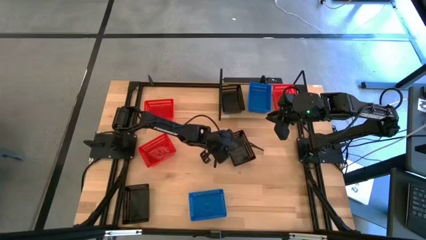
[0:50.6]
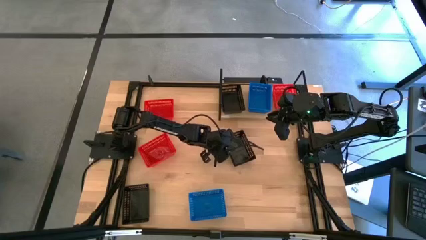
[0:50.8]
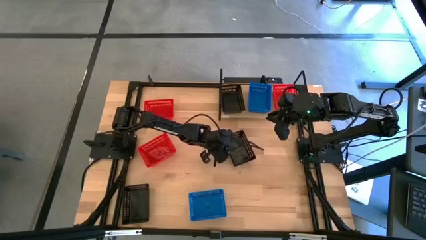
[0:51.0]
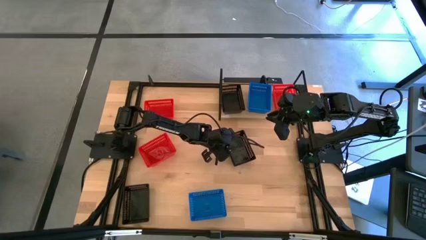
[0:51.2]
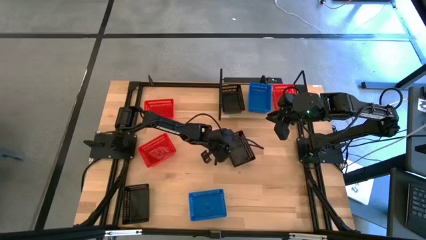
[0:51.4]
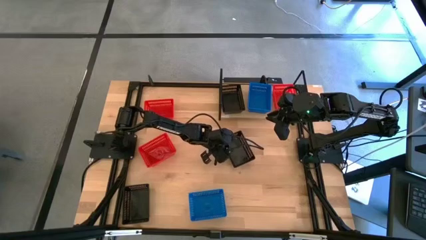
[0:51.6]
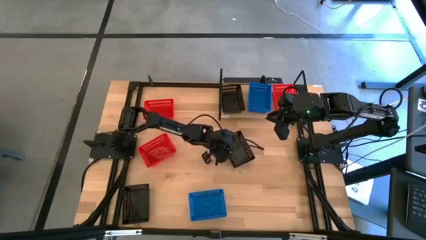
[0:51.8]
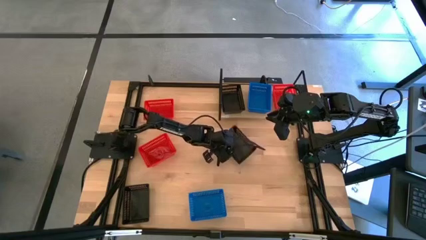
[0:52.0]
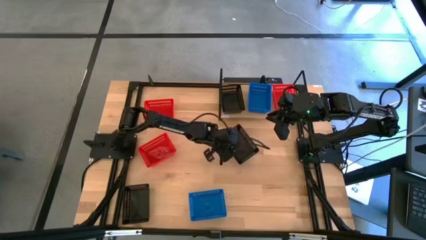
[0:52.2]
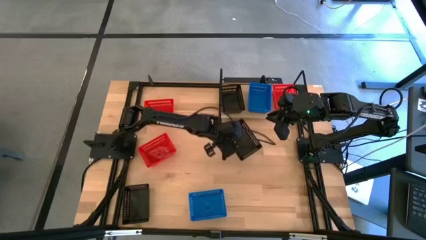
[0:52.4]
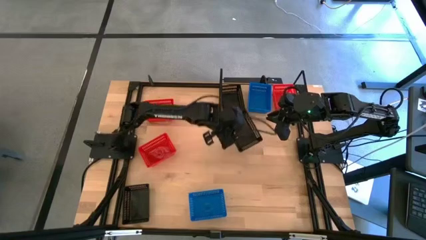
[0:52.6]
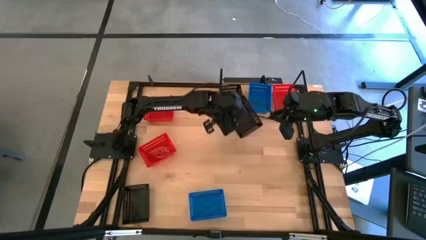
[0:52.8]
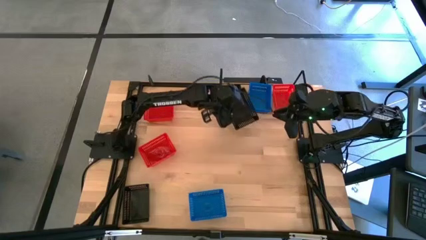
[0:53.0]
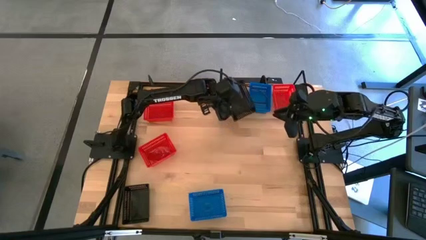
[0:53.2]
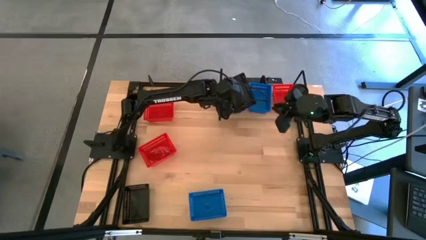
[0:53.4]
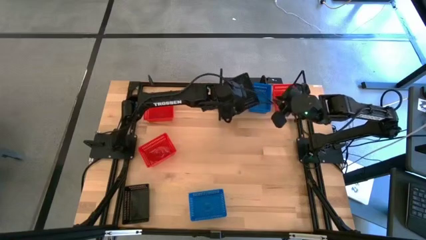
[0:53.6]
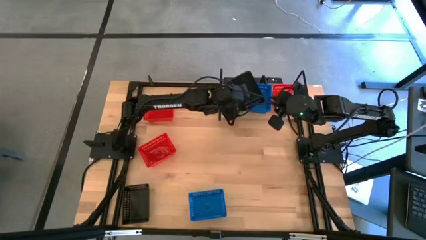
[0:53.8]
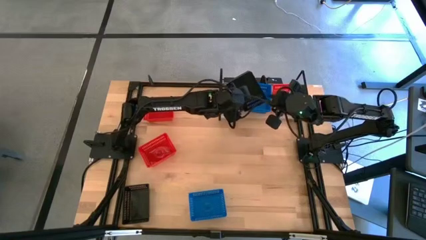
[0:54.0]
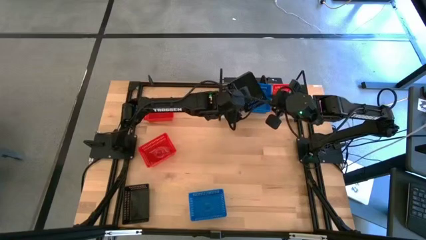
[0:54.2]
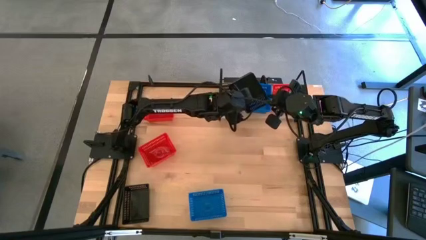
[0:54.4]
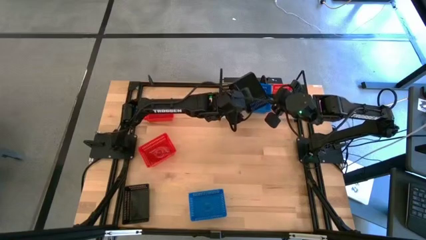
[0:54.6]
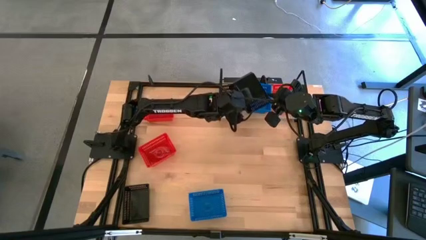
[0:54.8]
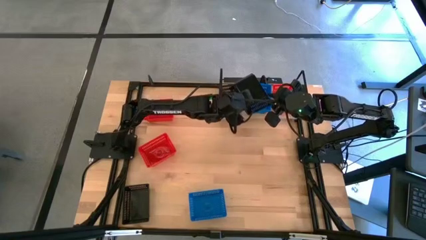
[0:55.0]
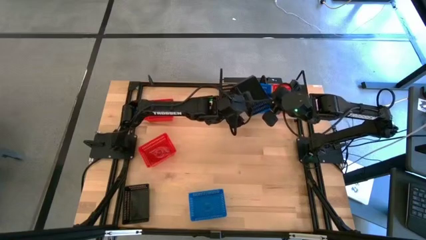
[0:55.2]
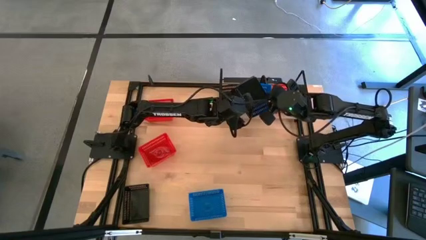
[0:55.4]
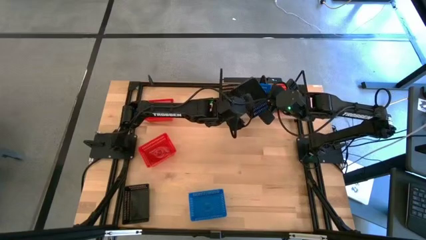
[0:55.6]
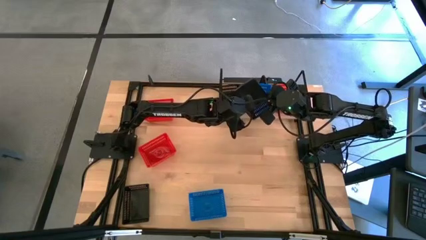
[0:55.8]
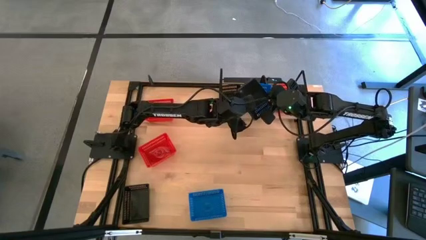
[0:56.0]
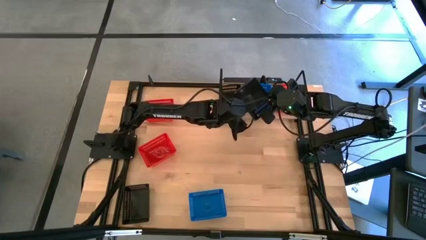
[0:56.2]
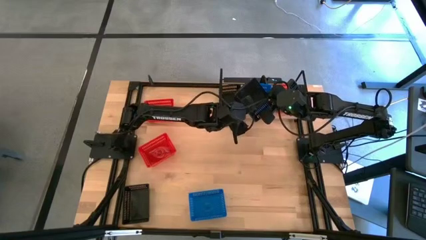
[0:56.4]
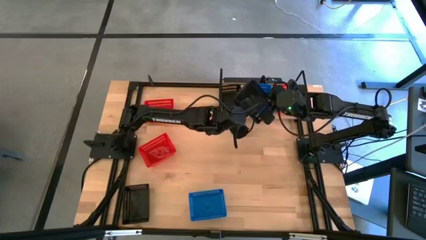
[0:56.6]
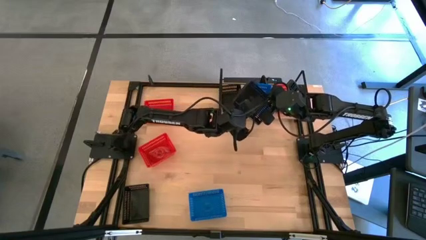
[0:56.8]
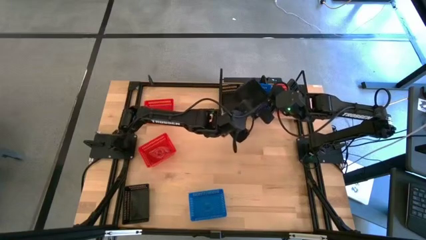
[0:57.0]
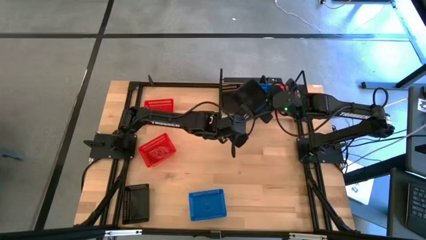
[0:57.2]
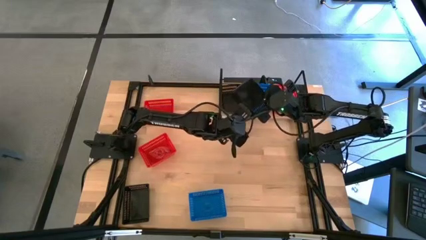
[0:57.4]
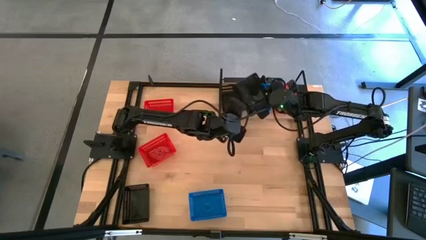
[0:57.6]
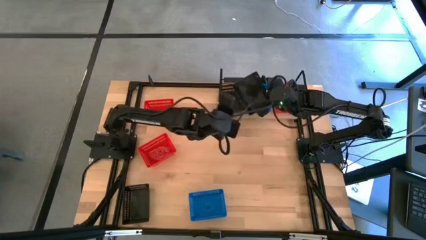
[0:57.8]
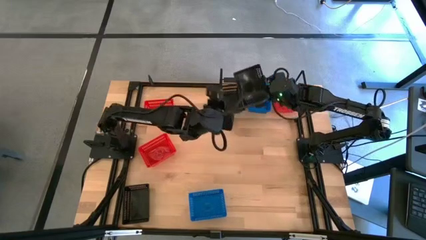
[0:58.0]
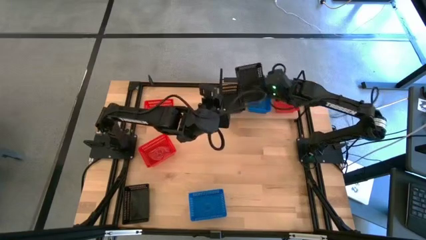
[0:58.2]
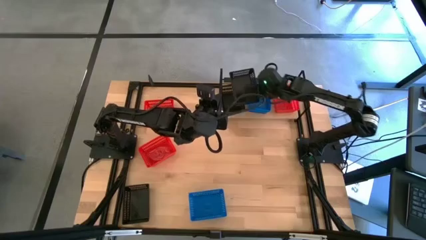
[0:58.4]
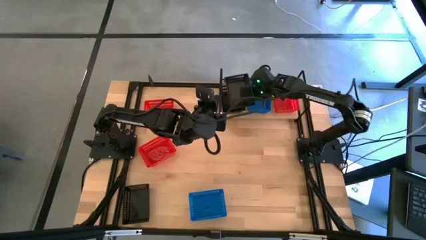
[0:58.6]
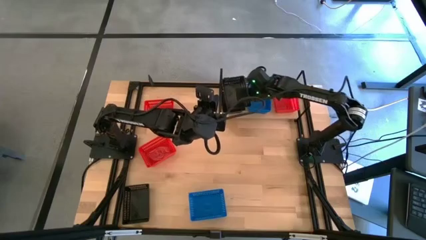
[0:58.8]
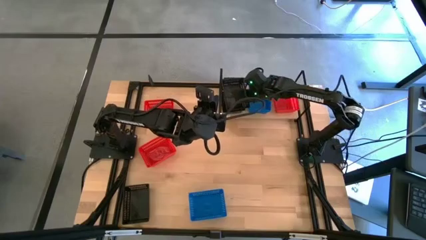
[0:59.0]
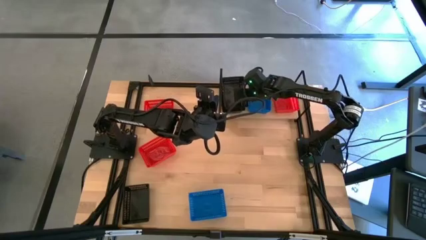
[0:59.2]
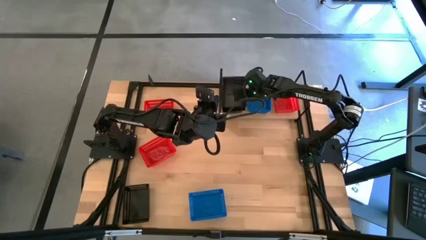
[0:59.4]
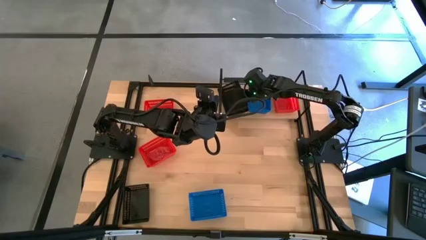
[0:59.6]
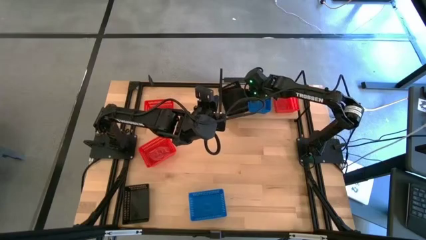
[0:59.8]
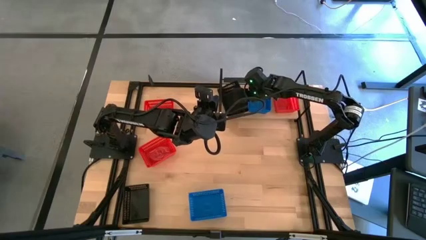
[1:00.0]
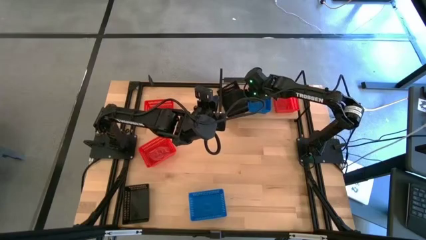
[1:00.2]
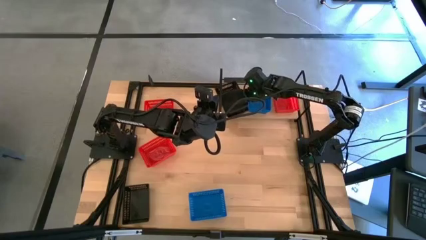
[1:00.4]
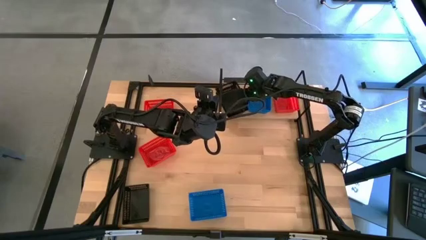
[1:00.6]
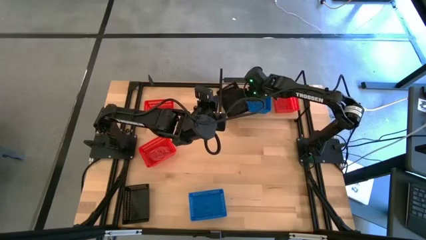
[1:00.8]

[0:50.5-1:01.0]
Task: Stack baskets on shelf by color
Stack the right black bin on top of the other black bin on the shelf

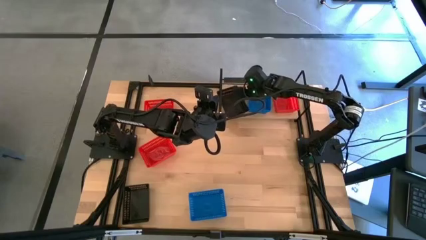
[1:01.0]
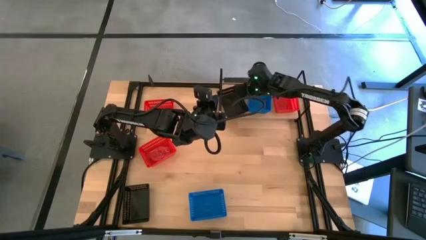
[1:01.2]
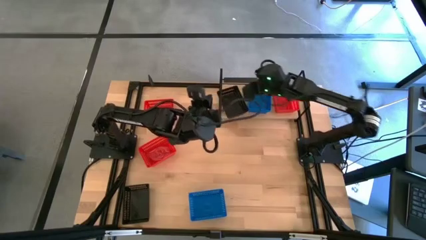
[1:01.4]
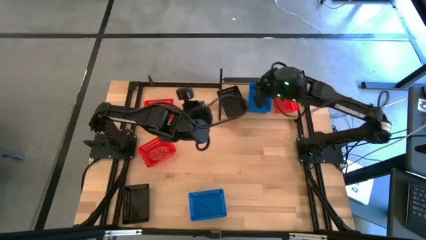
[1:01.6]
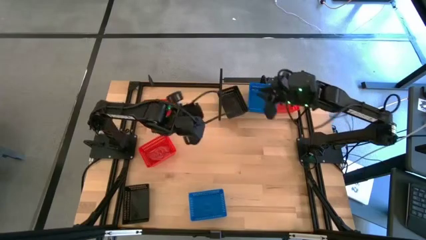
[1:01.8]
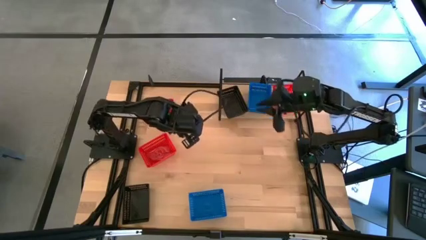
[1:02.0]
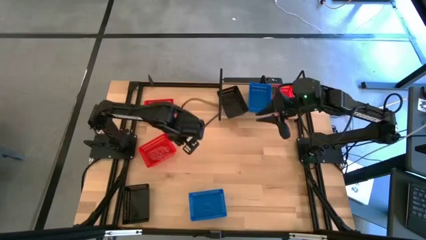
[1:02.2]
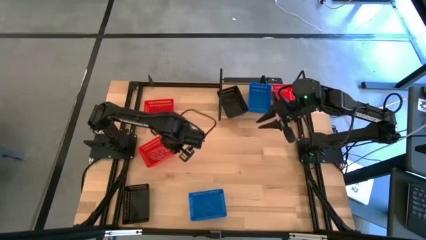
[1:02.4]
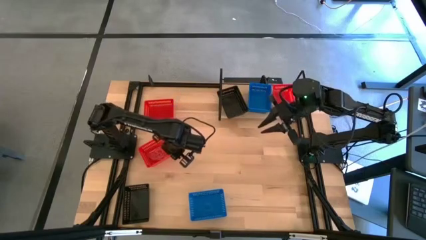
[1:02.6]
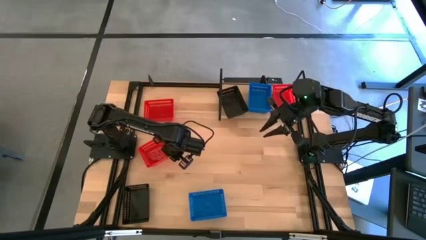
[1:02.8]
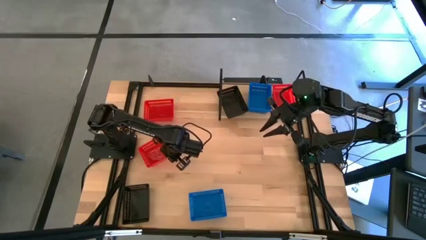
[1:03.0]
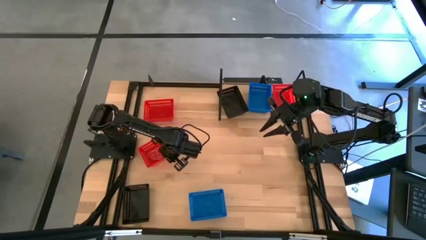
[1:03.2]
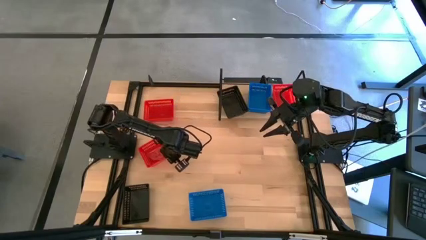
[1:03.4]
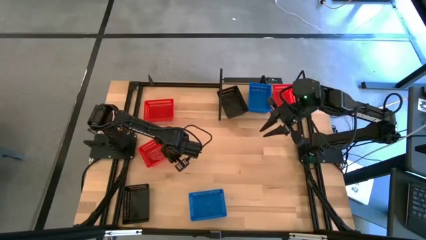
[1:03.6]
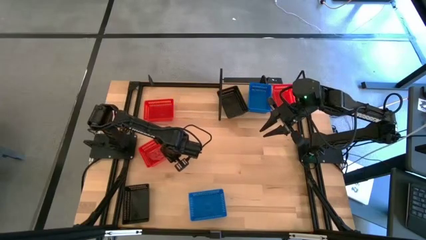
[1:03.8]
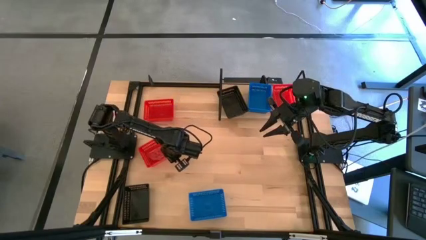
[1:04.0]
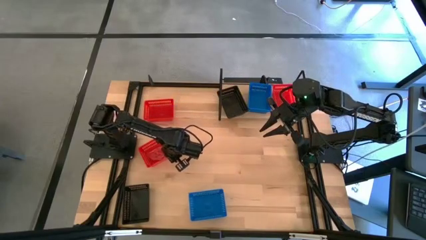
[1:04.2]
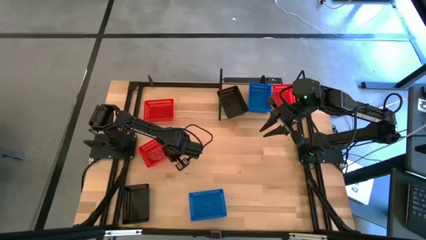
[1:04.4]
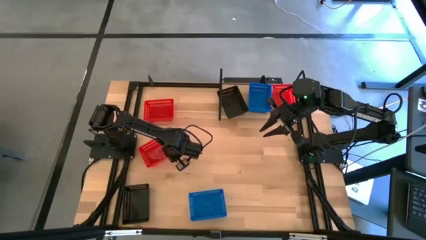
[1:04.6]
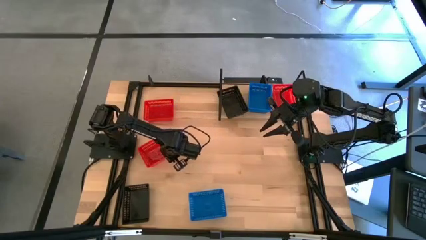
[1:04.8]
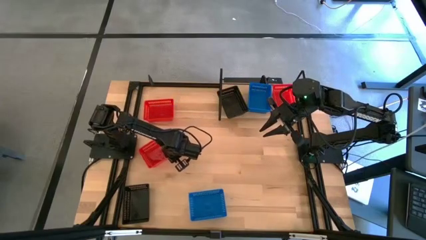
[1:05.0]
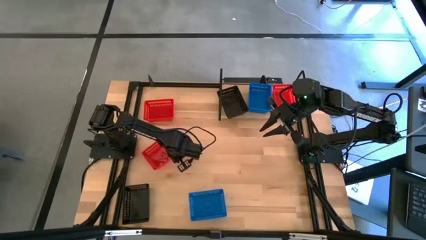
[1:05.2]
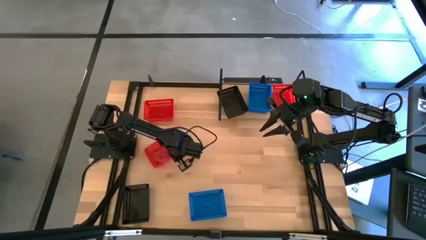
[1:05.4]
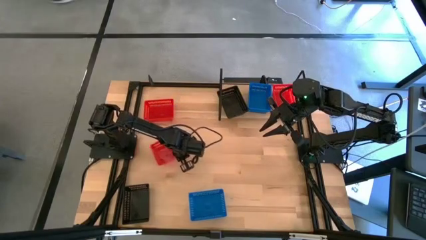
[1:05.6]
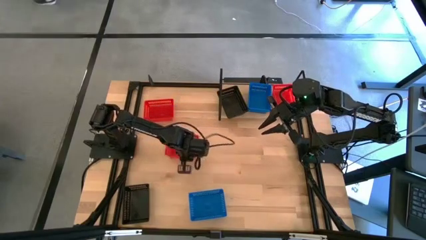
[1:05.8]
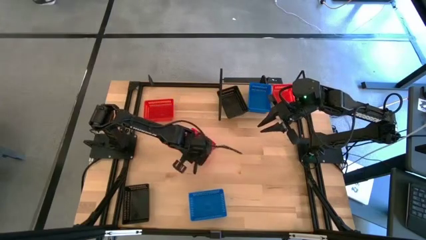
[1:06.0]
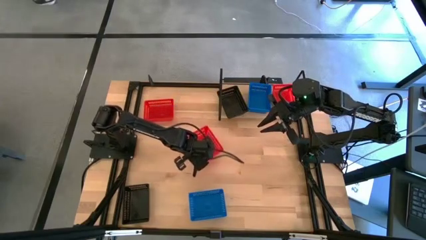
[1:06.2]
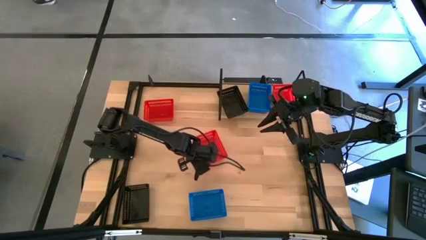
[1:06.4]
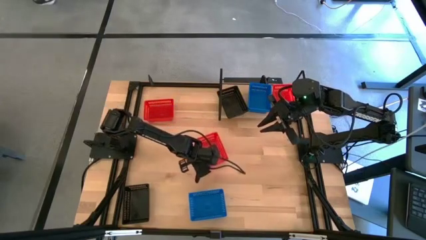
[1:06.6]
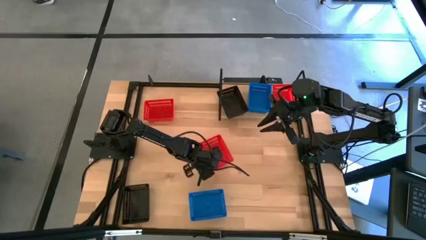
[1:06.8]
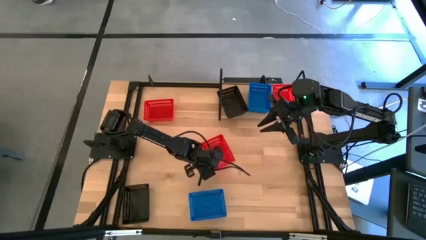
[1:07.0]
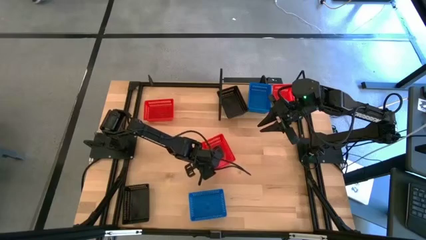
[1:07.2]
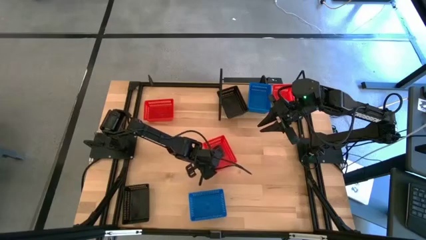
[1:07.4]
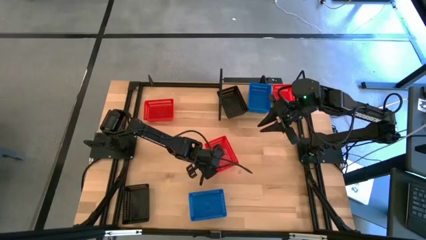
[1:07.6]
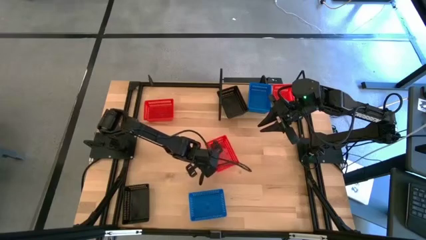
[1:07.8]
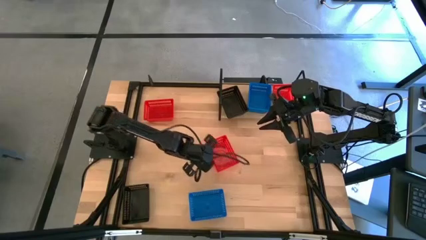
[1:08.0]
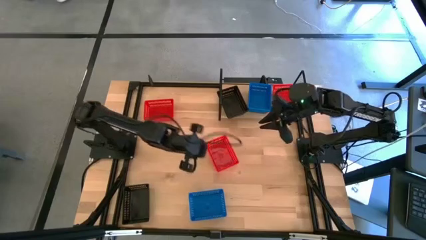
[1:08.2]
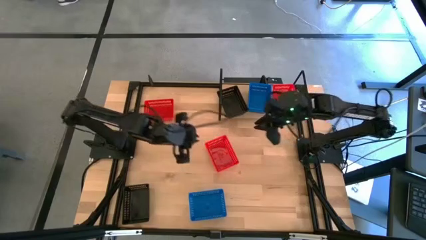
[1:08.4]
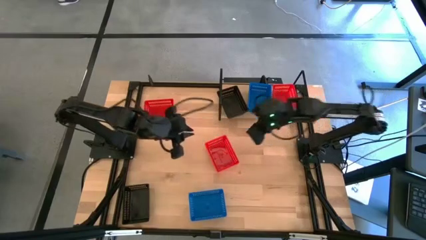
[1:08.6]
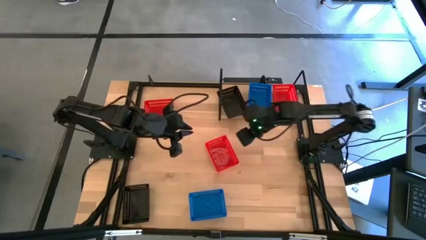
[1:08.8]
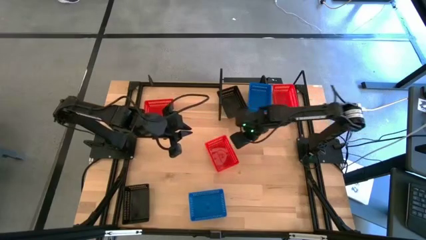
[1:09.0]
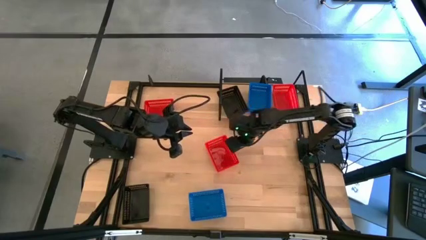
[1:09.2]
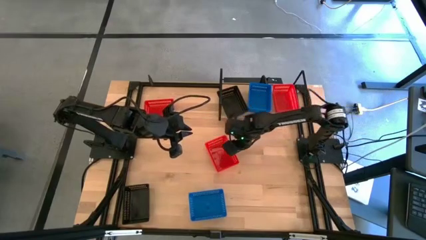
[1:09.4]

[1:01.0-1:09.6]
Stack the bottom red bin on top of the other red bin on the shelf
